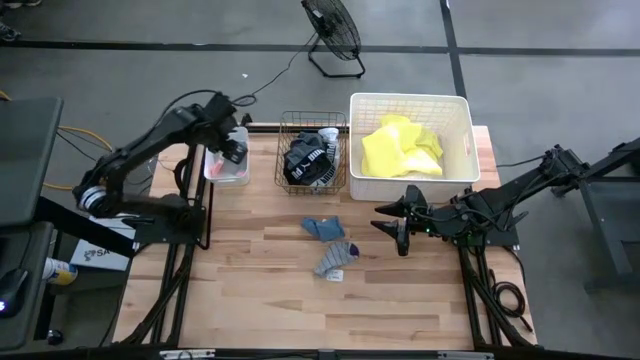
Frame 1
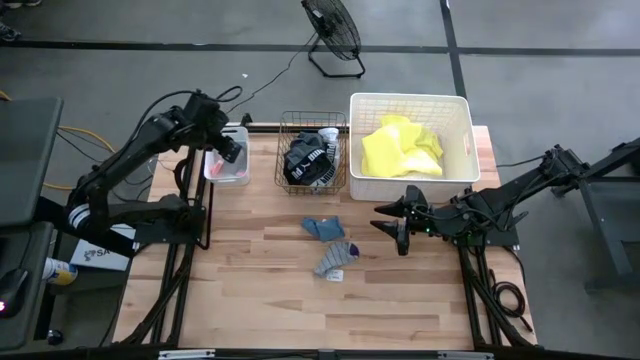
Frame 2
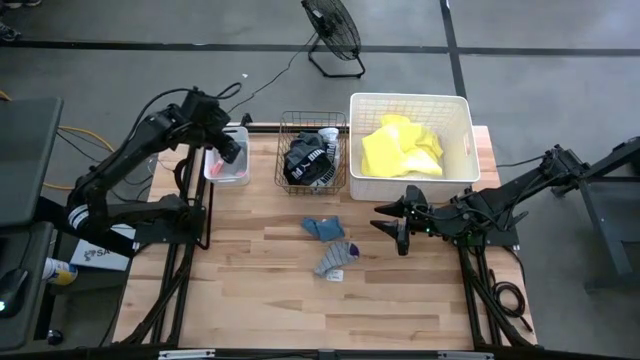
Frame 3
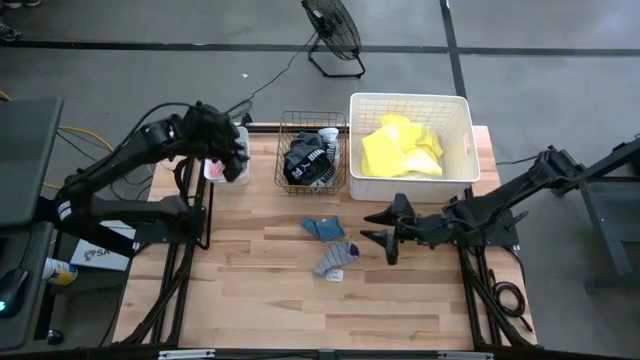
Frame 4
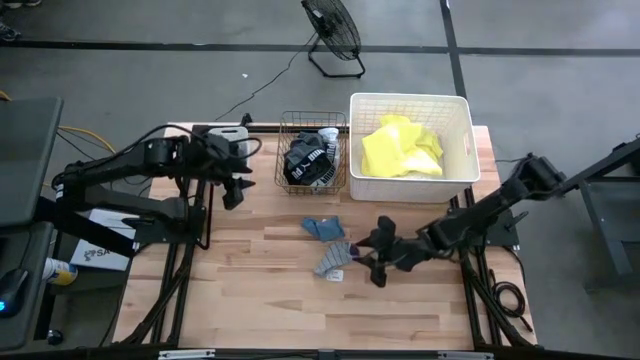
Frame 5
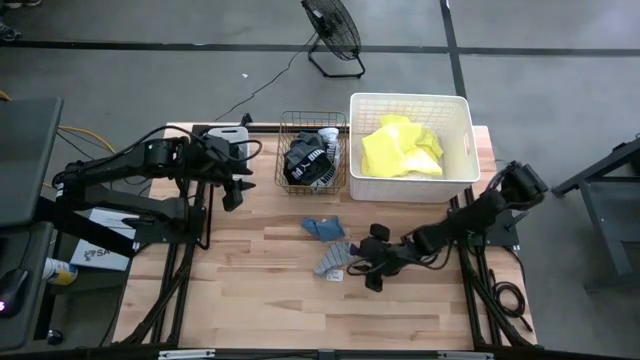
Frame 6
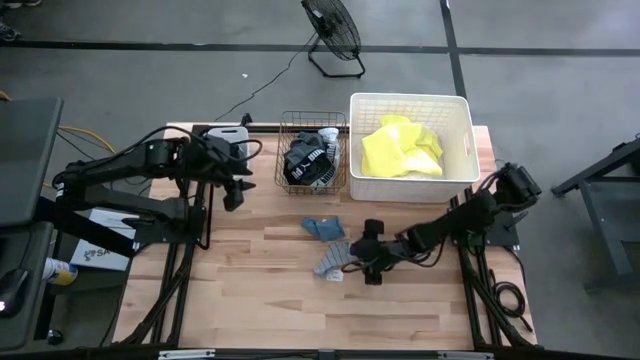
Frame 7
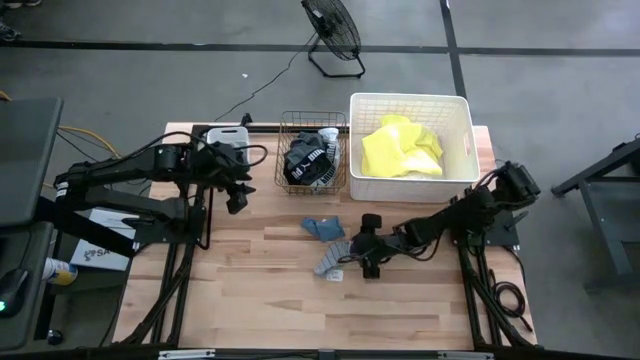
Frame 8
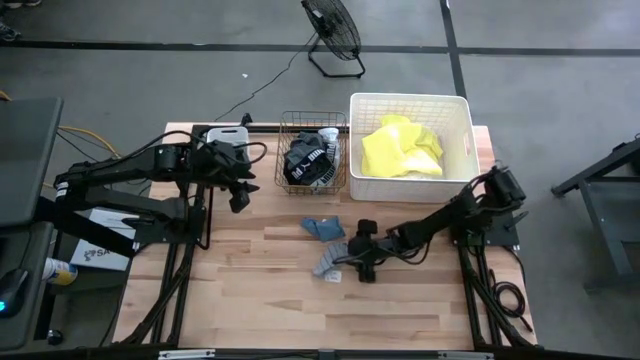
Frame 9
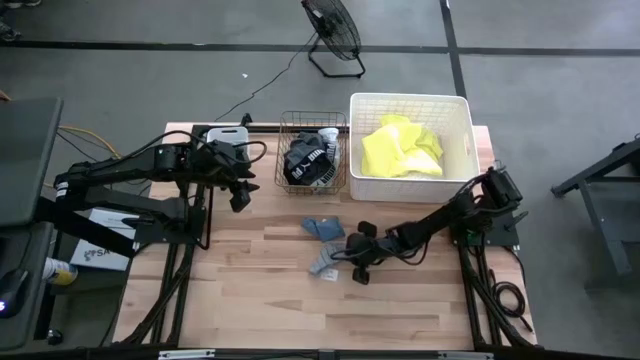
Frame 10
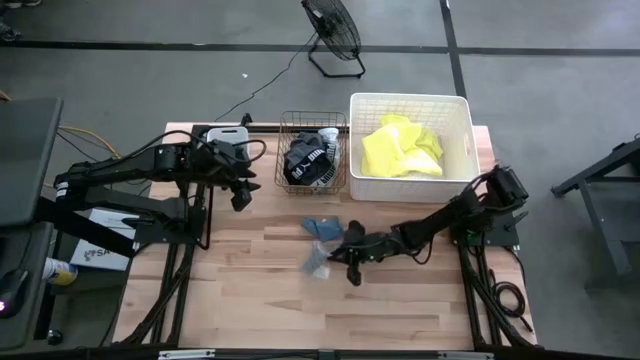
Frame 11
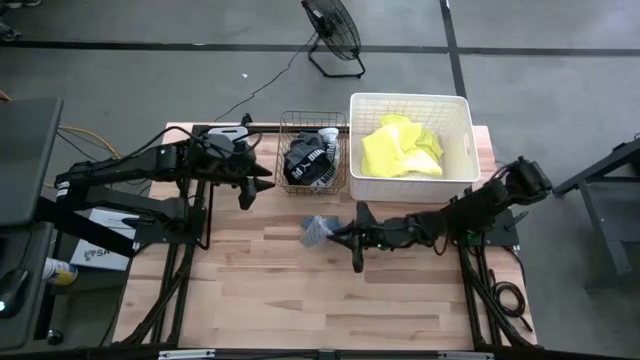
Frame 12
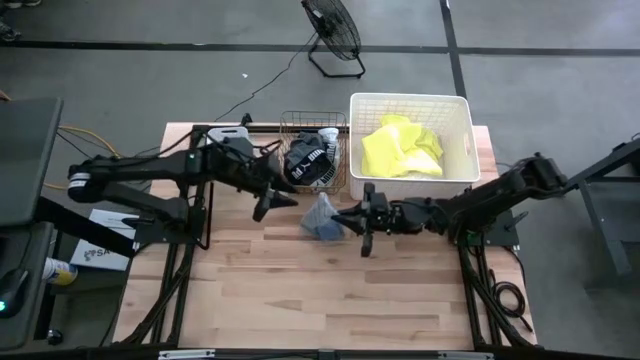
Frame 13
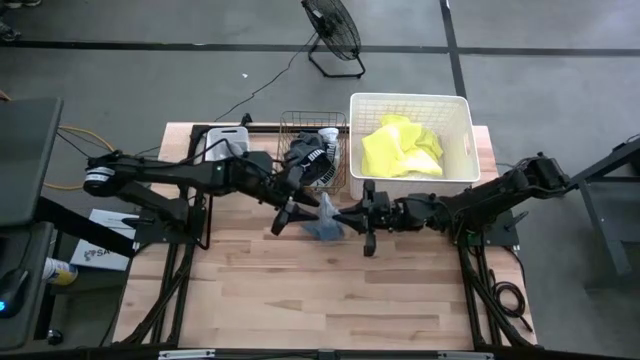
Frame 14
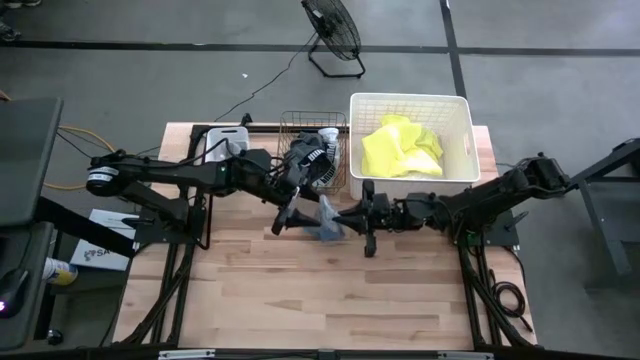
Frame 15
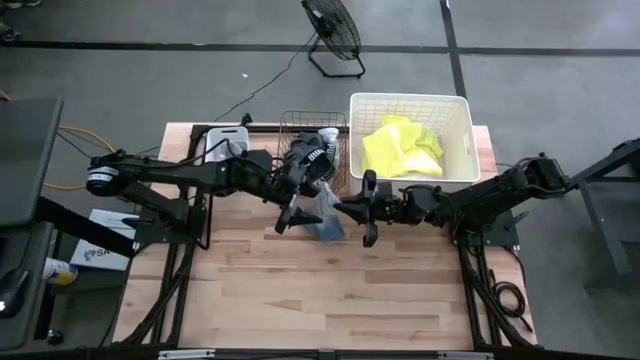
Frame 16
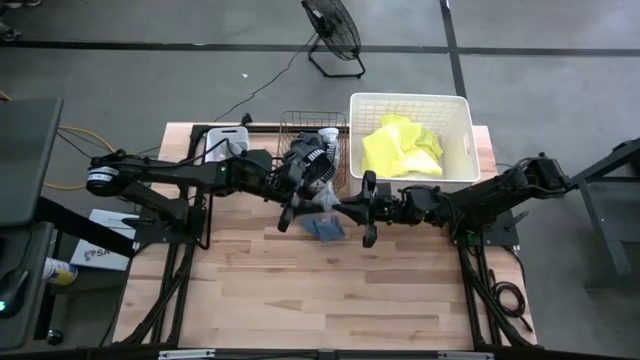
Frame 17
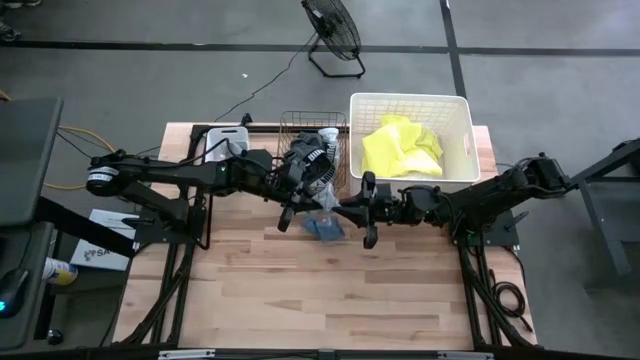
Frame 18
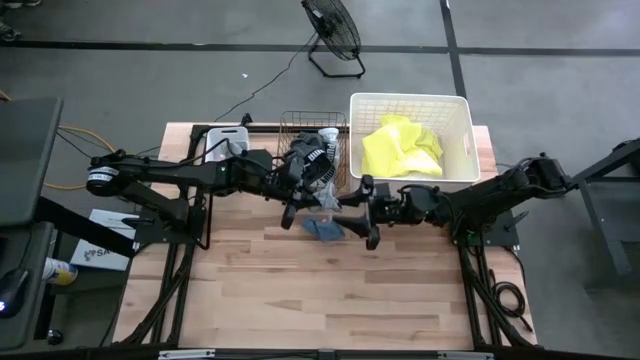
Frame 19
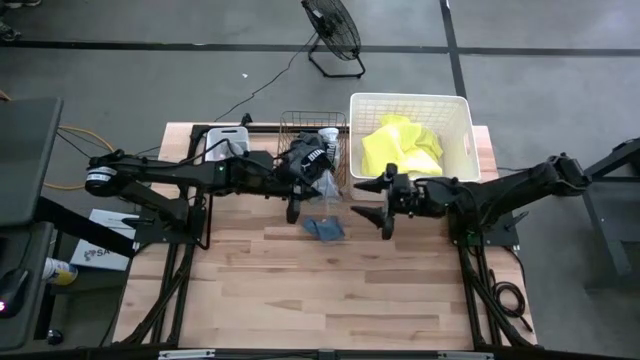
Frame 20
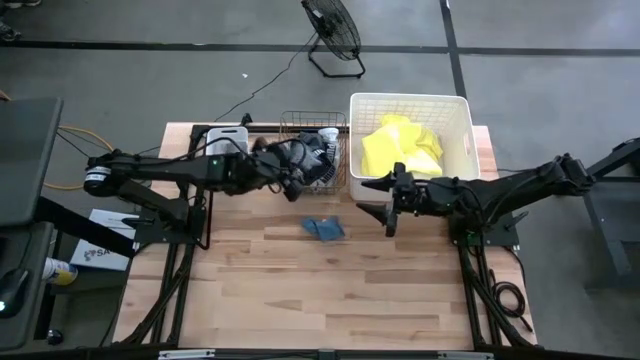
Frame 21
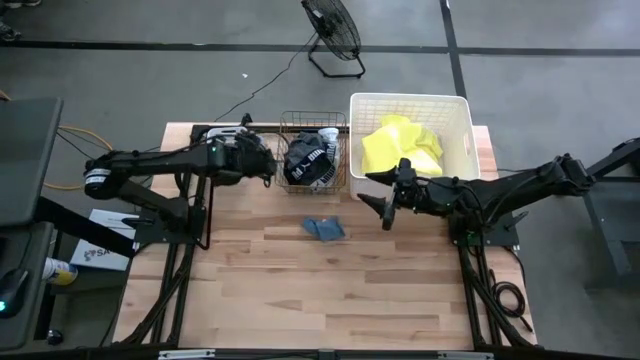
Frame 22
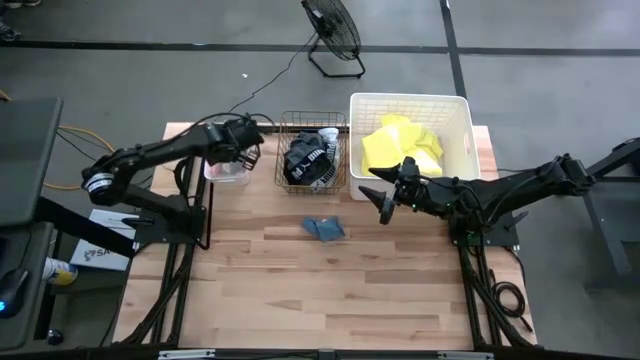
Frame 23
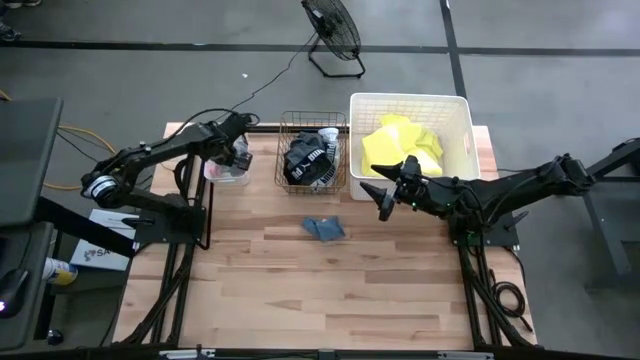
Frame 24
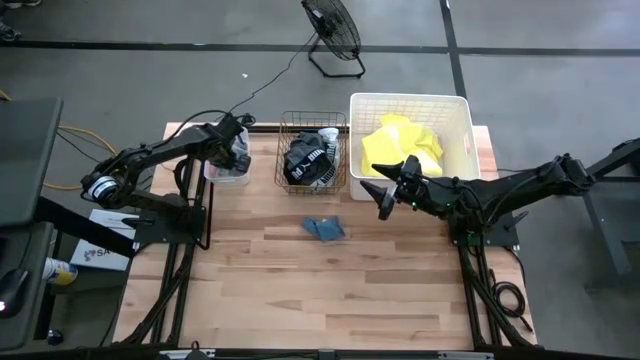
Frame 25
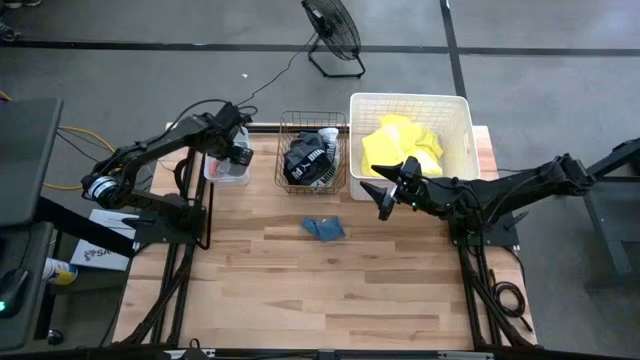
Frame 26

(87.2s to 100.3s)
Task: Pick & Place Cloths
Put the gray sock into the left white bin

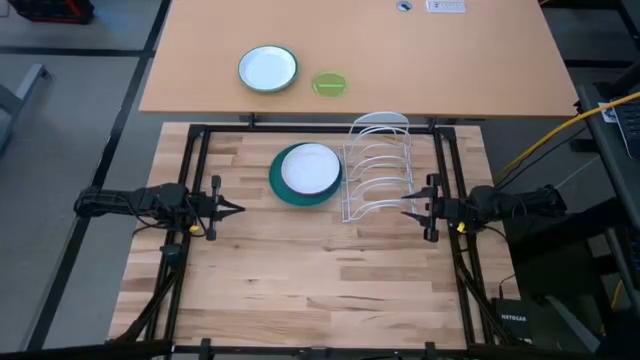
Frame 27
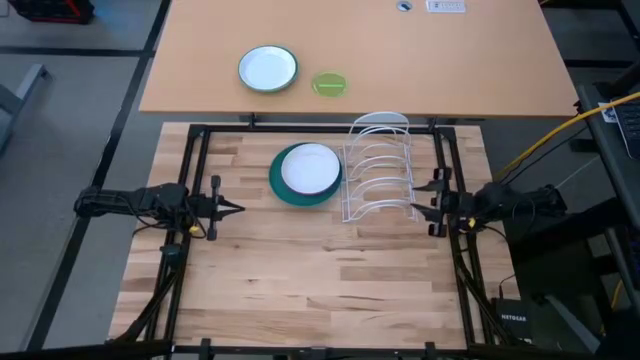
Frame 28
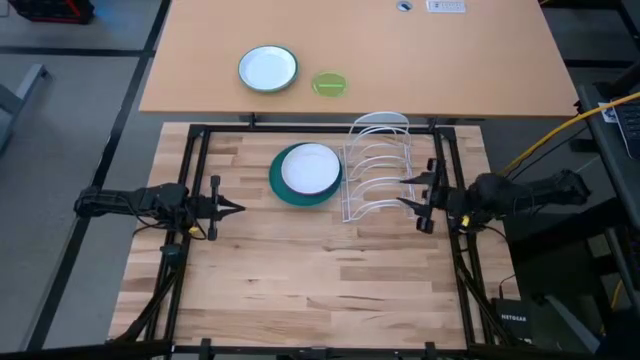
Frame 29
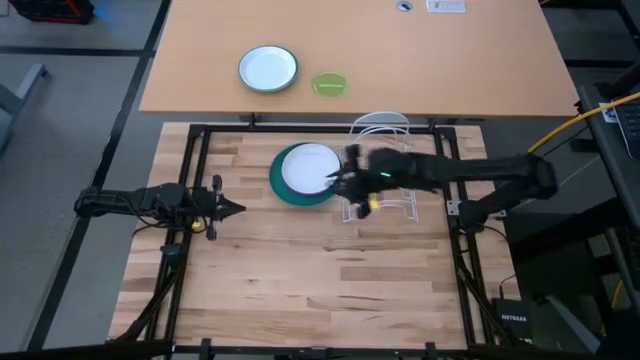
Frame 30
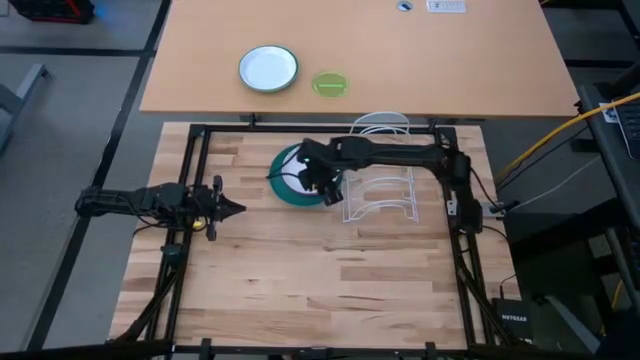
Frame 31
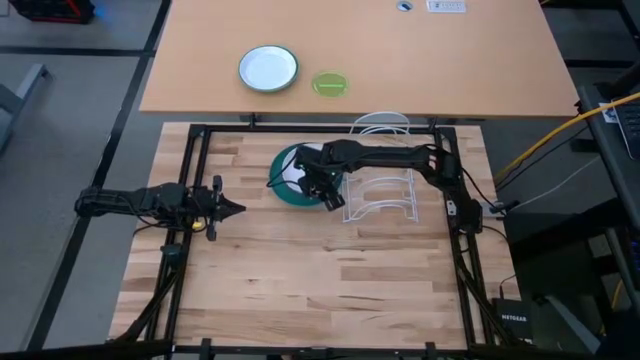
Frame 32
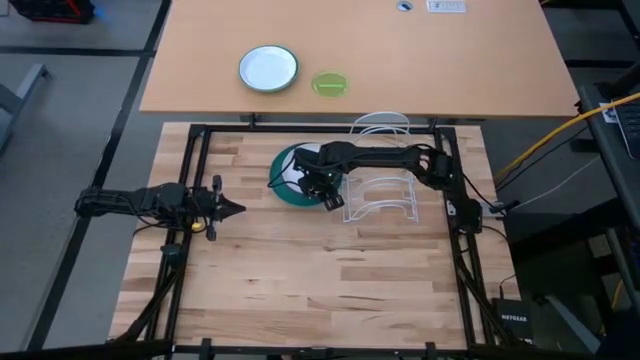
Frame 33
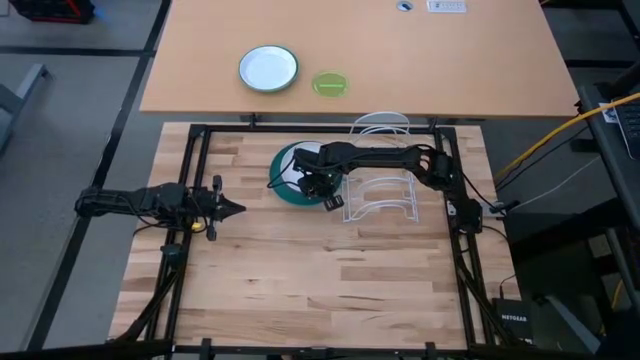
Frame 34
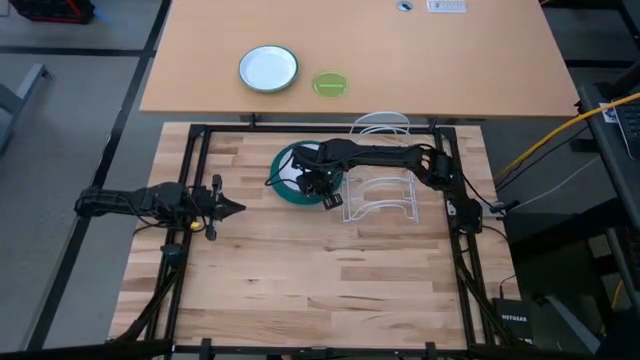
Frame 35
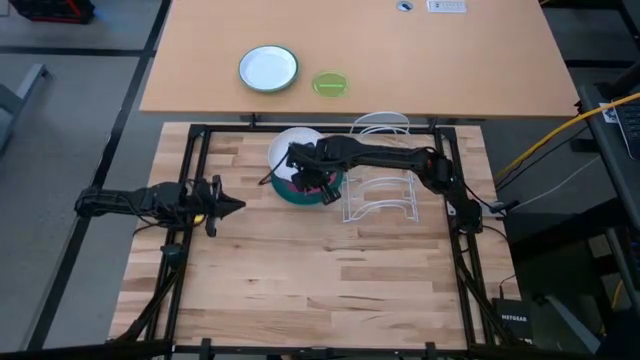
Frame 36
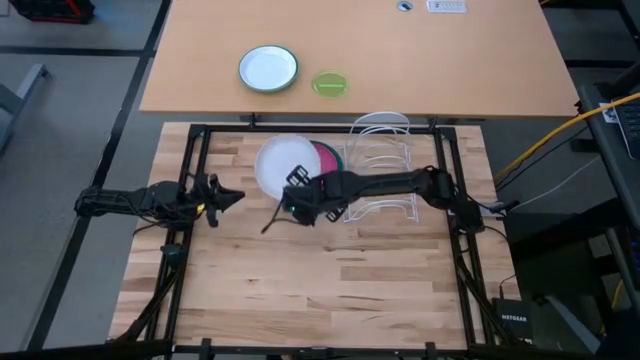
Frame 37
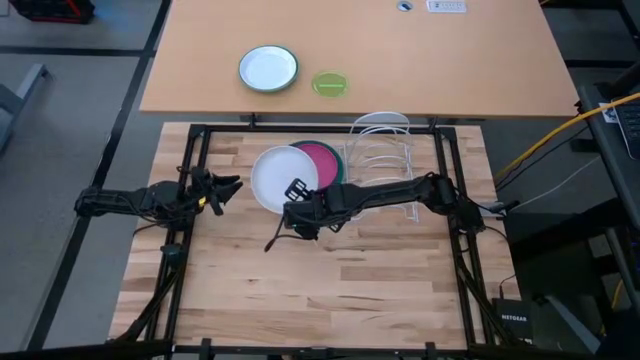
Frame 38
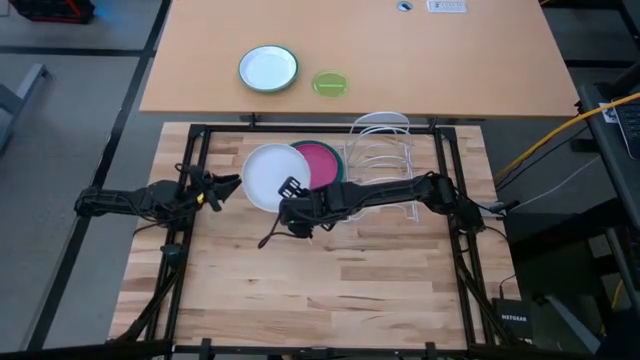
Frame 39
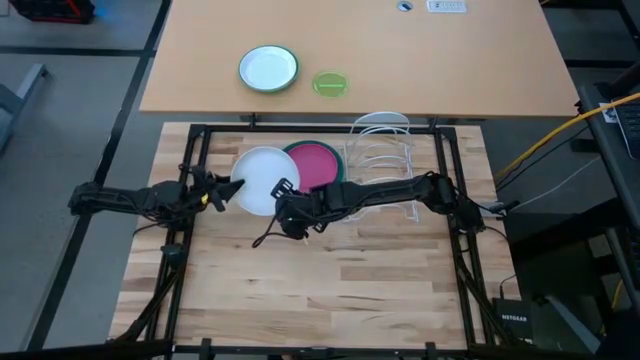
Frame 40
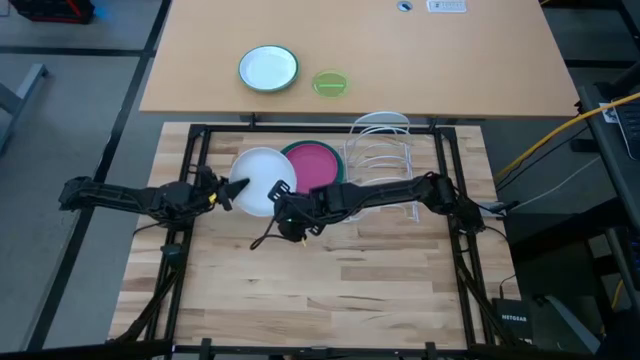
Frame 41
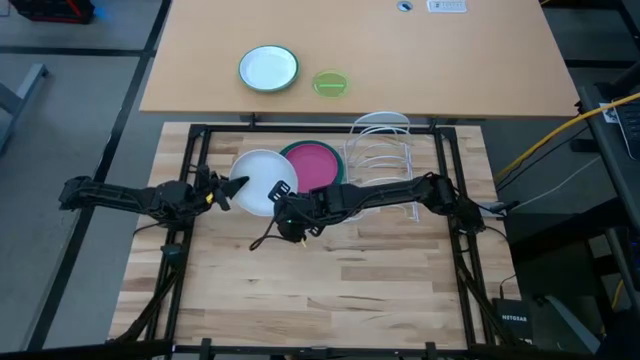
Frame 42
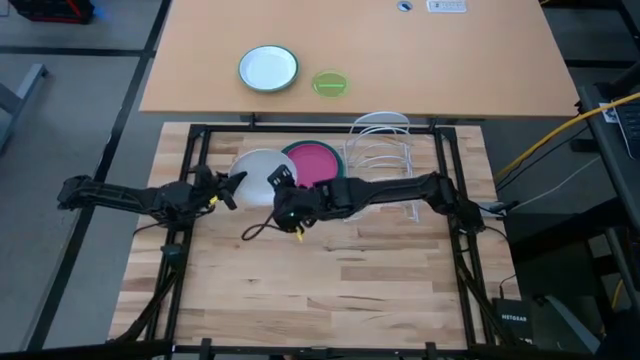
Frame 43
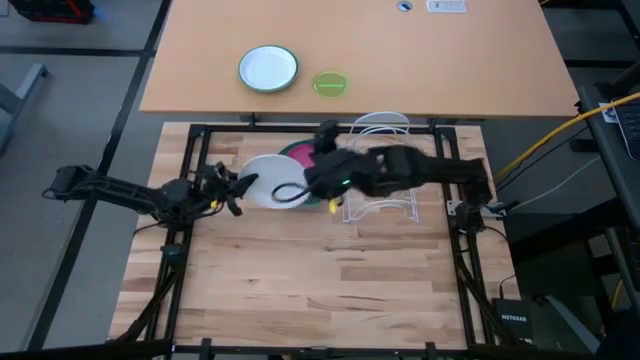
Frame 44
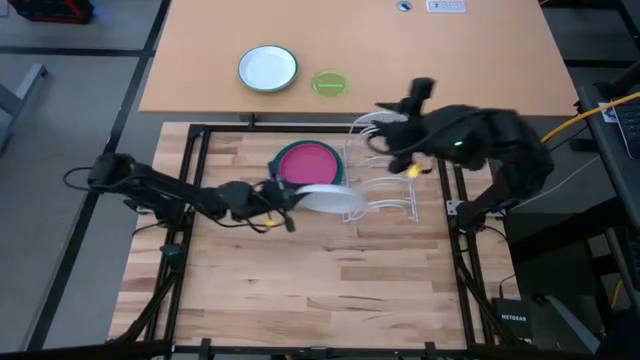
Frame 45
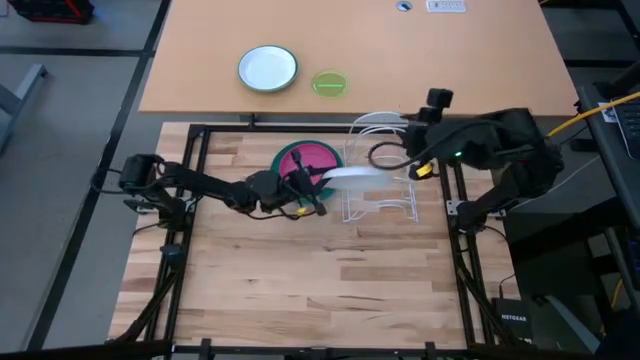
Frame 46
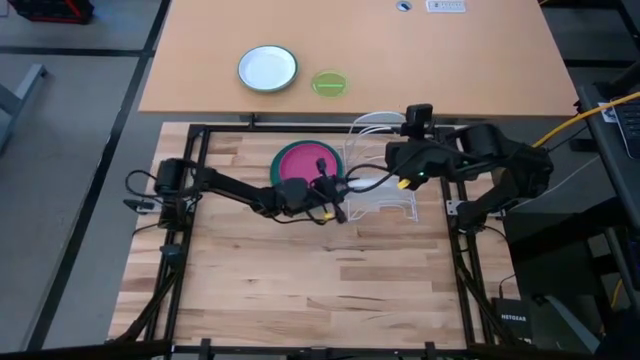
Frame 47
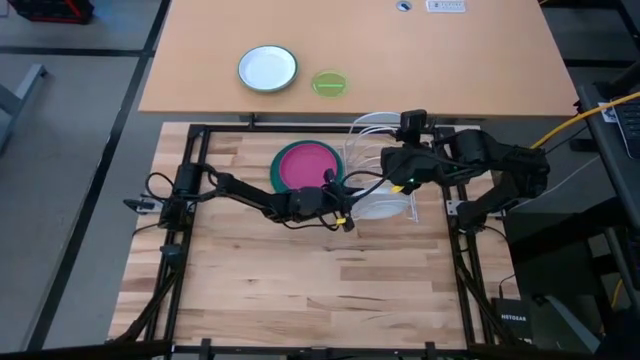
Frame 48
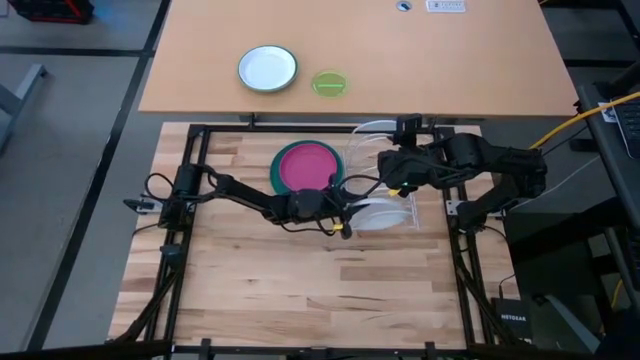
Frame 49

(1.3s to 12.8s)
Task: Sort dishes
Put the white plate in the dish rack
